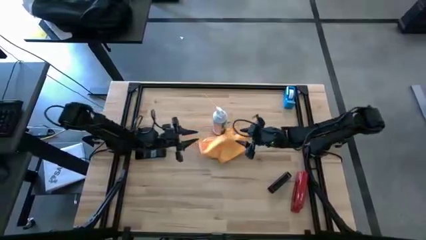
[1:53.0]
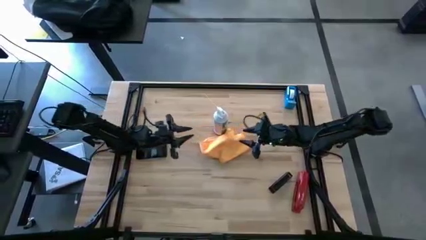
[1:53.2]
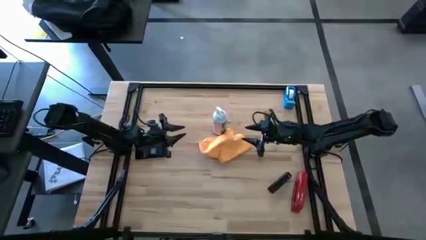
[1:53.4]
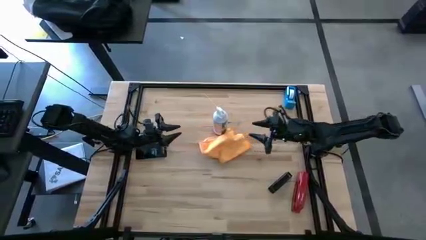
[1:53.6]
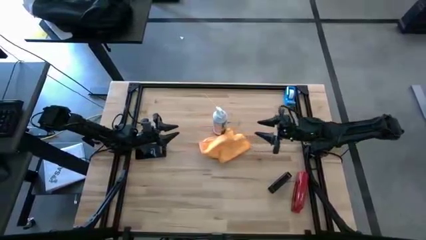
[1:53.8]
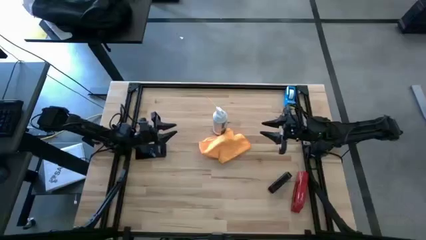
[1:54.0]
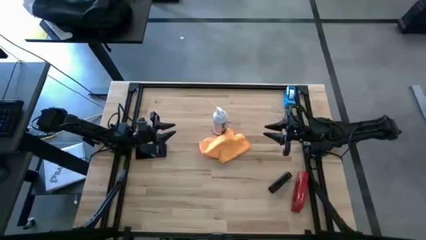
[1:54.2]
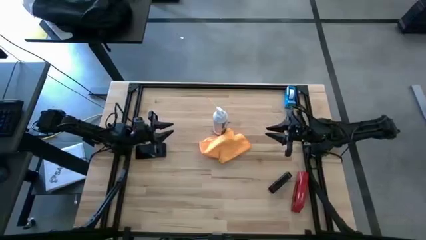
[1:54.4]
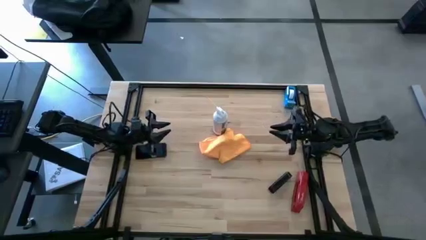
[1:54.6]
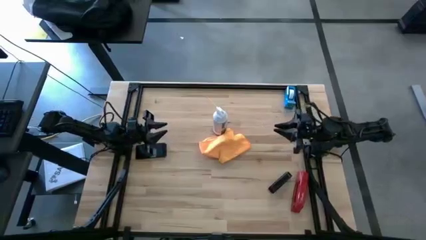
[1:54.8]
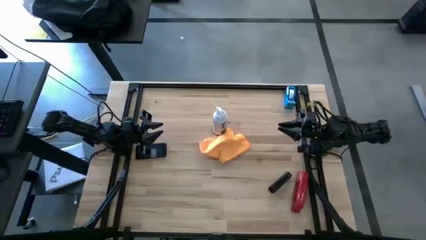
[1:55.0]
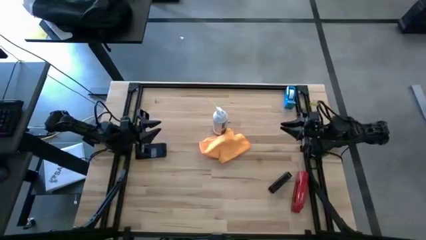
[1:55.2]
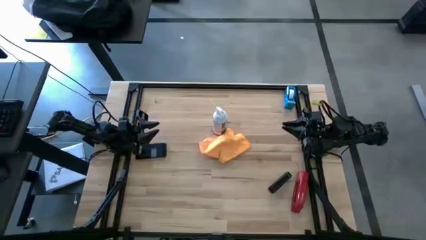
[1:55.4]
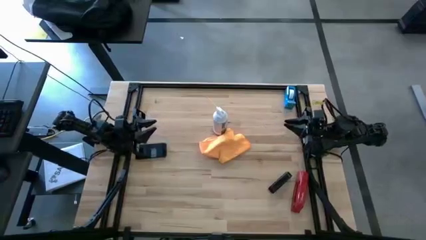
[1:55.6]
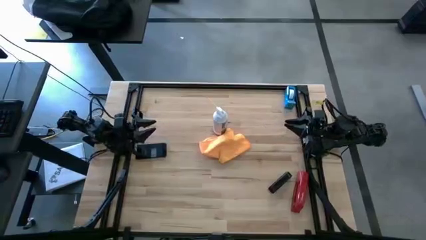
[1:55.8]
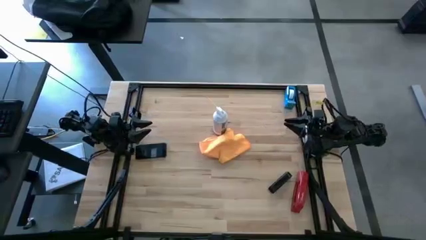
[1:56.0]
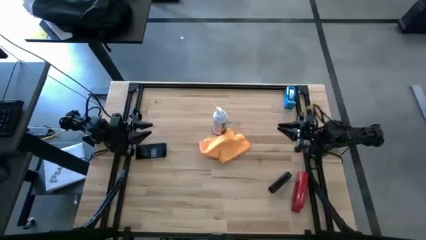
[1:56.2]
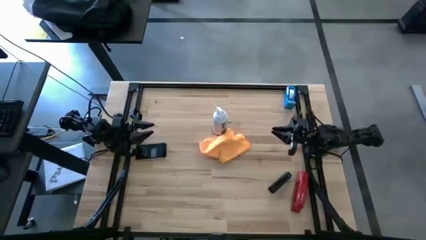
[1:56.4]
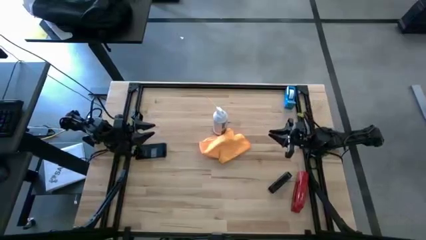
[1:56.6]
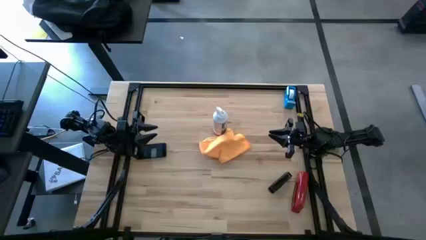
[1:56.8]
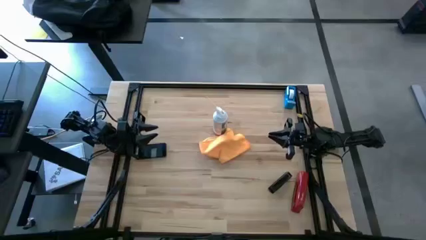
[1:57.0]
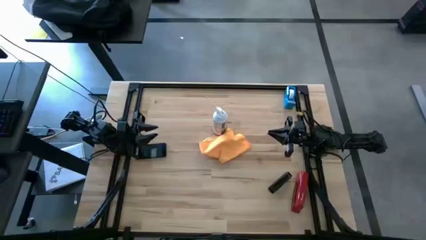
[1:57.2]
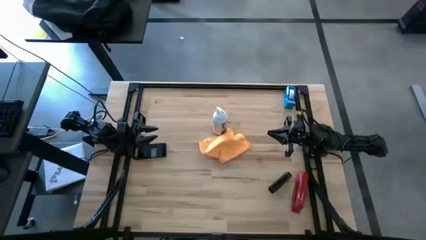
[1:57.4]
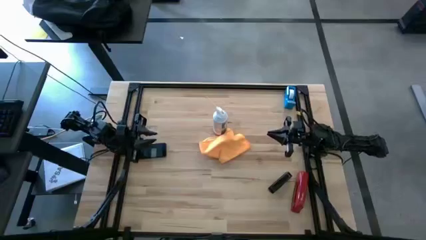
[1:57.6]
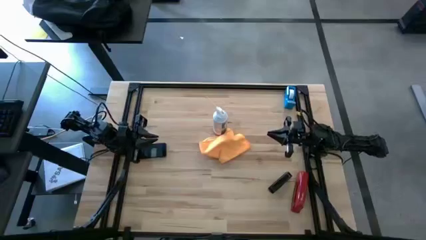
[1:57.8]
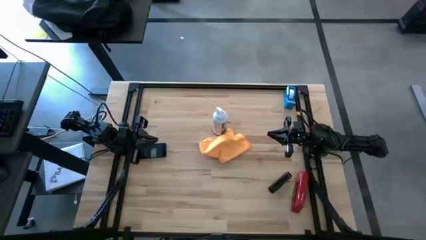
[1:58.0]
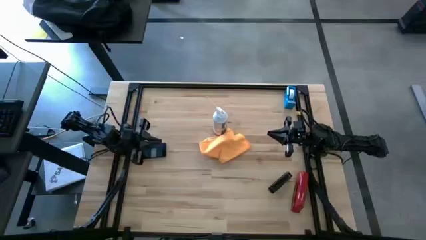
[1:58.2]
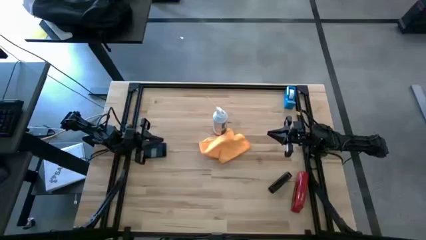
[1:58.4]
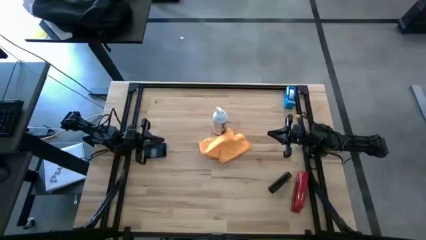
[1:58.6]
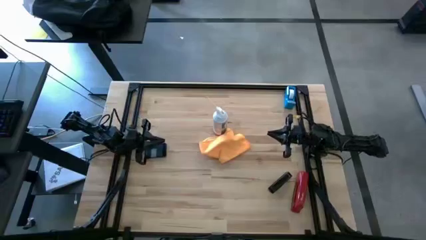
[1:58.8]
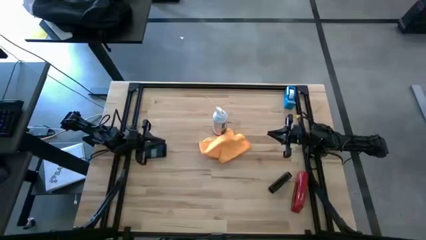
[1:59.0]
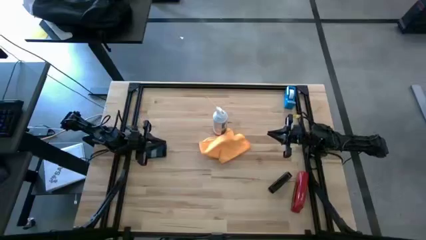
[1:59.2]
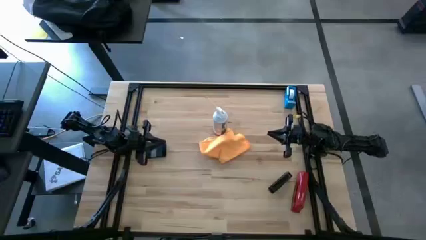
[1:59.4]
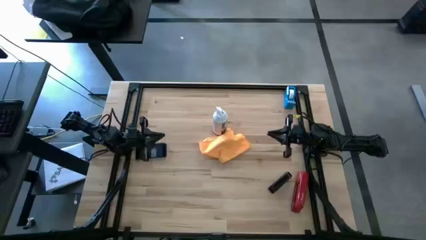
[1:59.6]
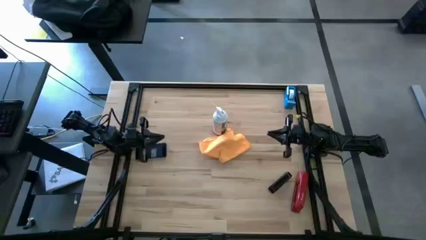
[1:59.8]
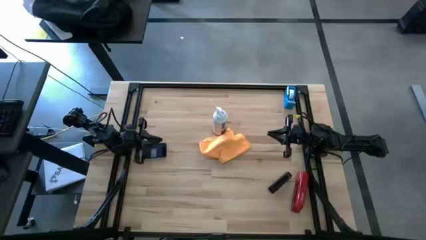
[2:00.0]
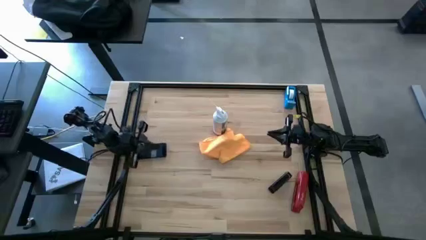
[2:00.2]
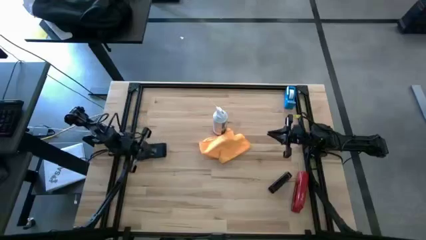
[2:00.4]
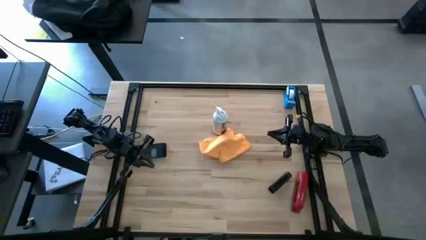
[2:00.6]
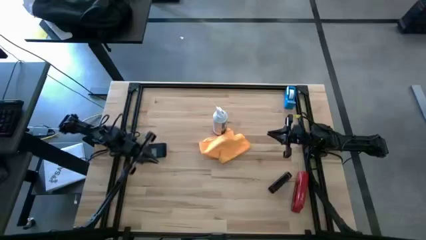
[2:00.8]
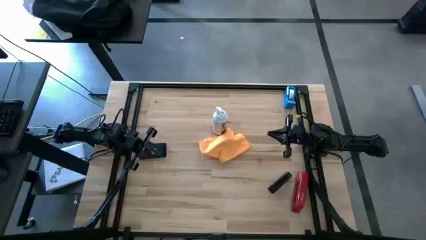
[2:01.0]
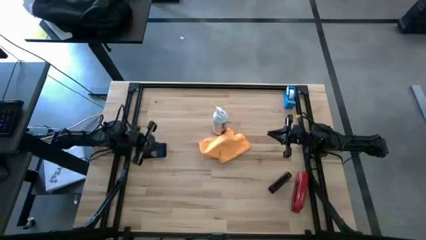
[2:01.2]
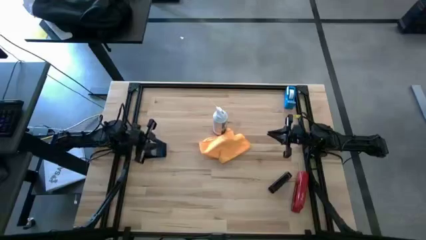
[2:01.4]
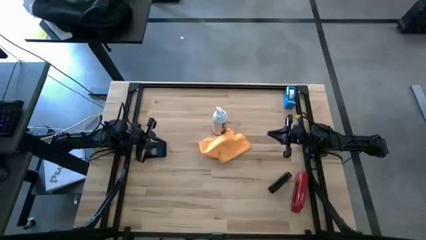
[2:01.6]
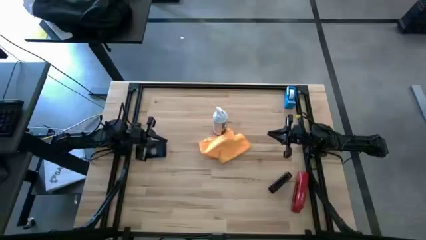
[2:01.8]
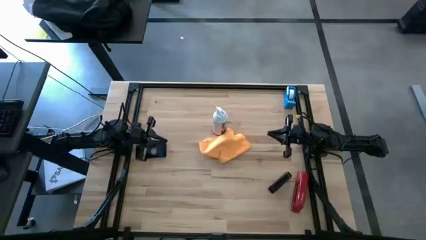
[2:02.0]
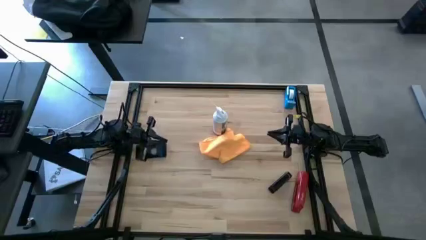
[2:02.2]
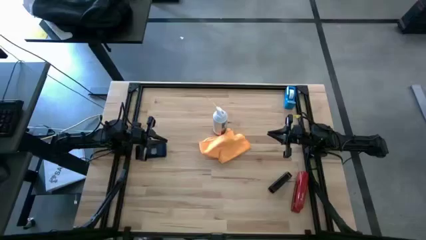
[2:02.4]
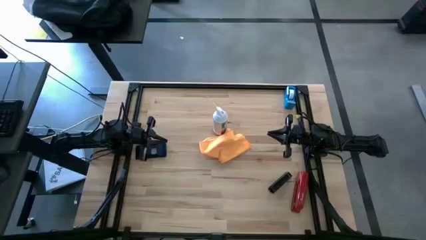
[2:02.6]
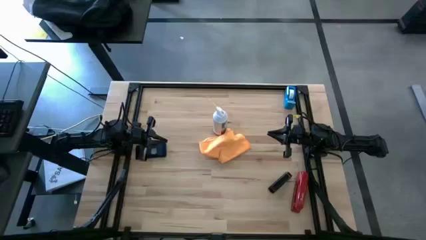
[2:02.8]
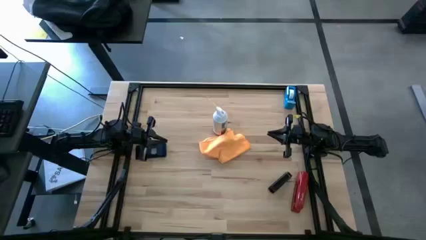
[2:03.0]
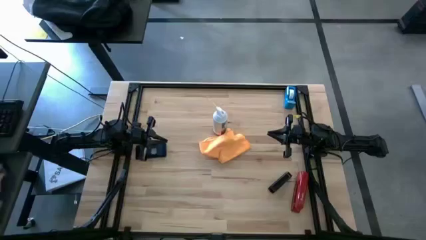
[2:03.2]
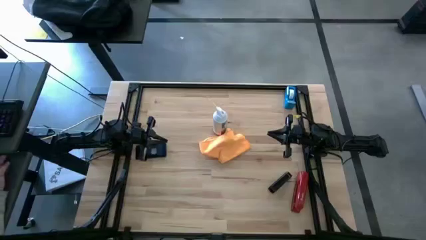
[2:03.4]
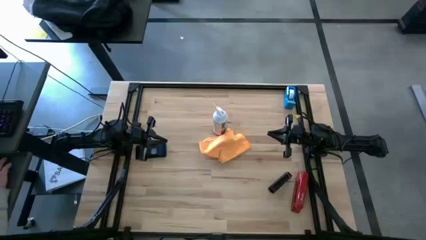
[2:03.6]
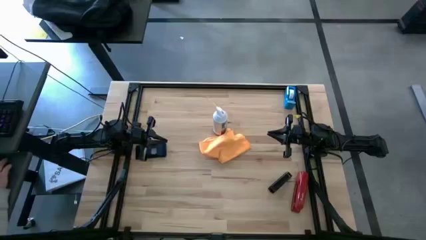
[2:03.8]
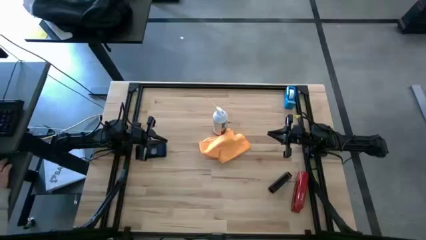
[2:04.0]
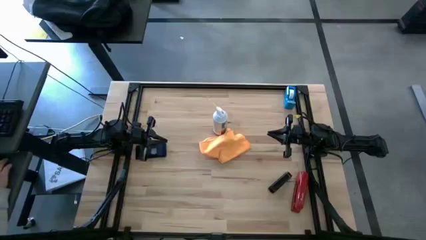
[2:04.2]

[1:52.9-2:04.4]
Task: Apply microfiber cloth
Return to Home Position
